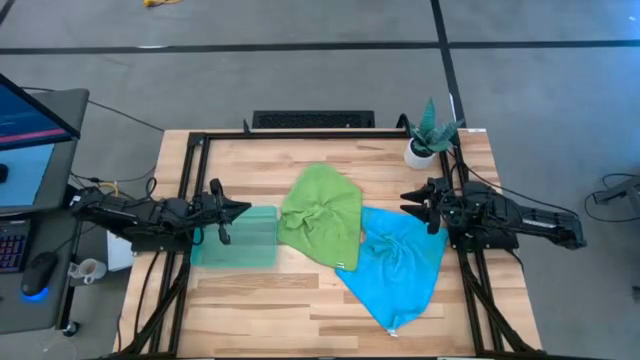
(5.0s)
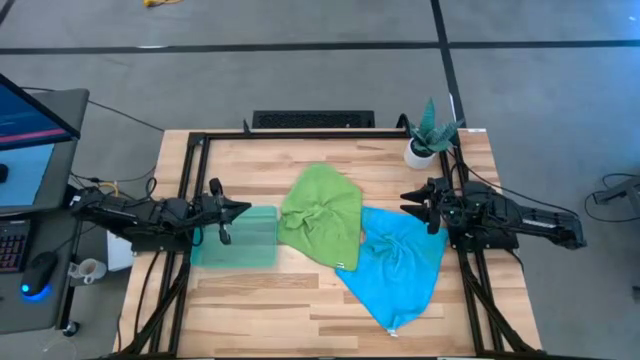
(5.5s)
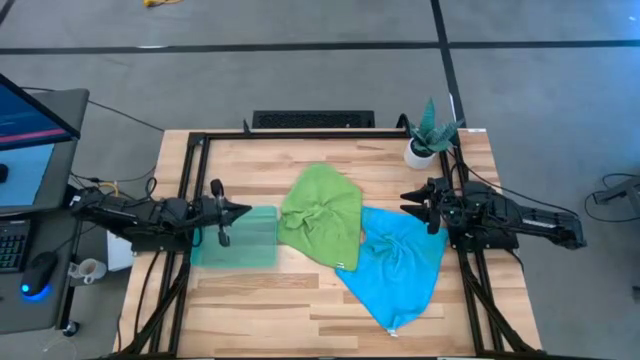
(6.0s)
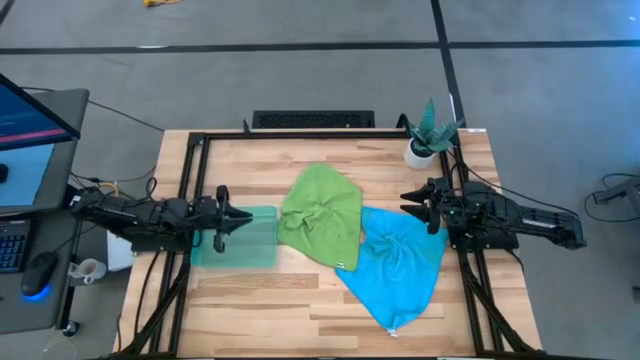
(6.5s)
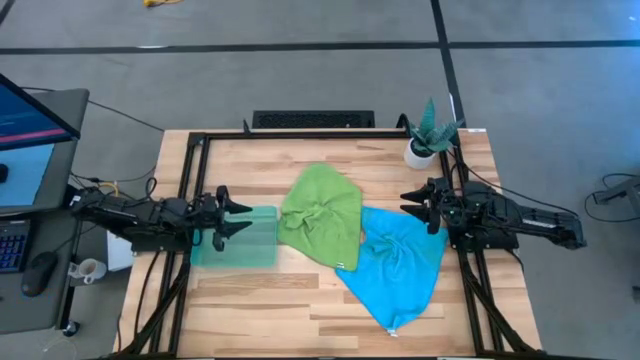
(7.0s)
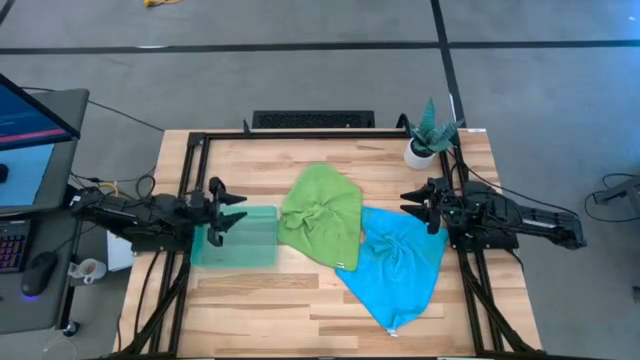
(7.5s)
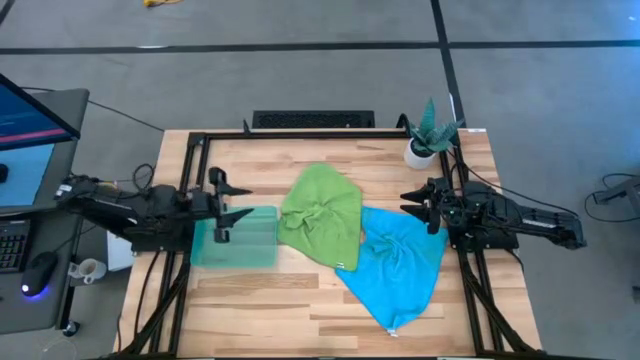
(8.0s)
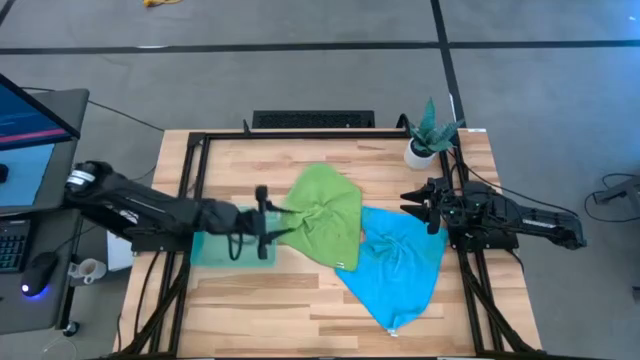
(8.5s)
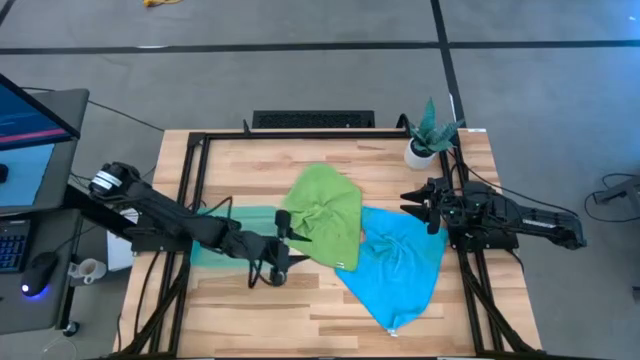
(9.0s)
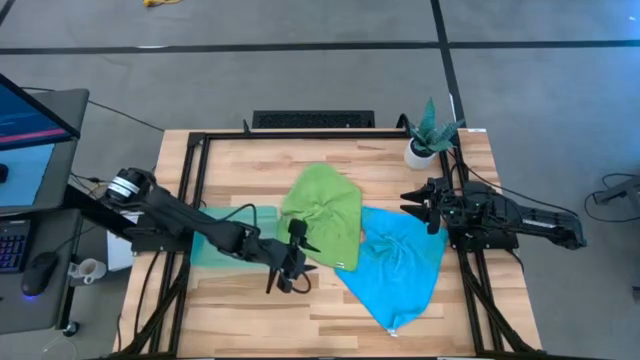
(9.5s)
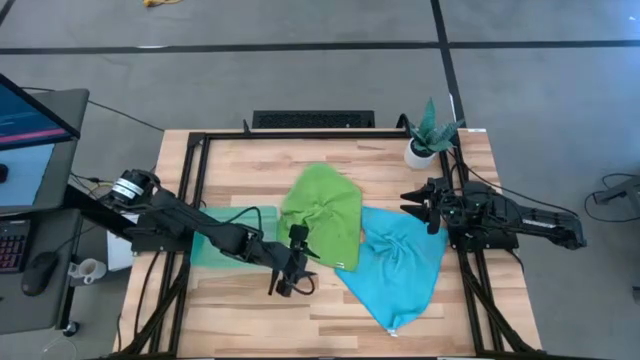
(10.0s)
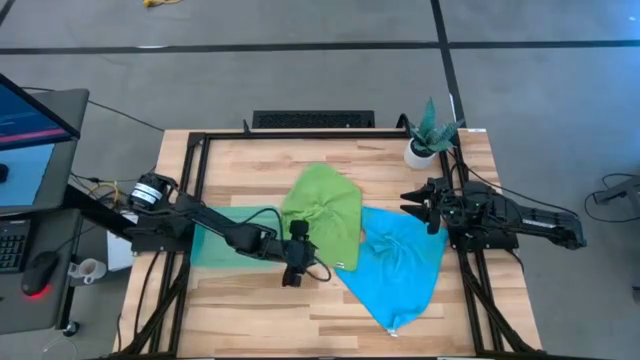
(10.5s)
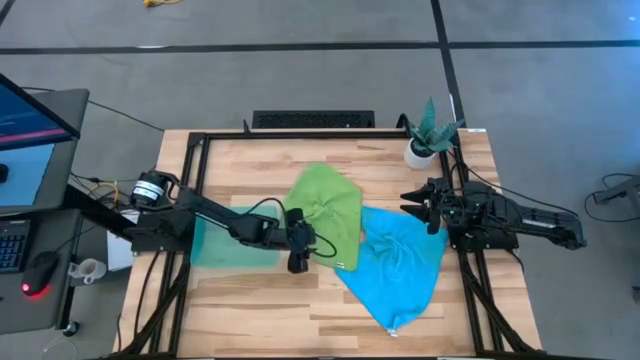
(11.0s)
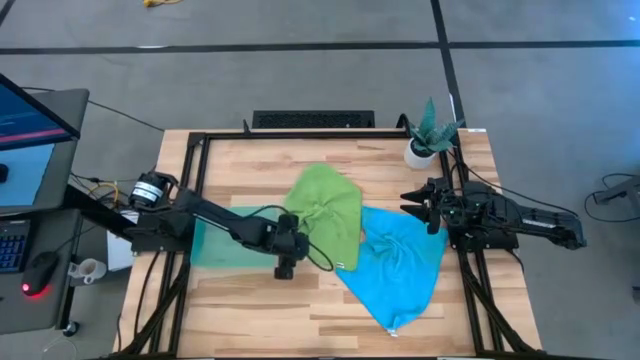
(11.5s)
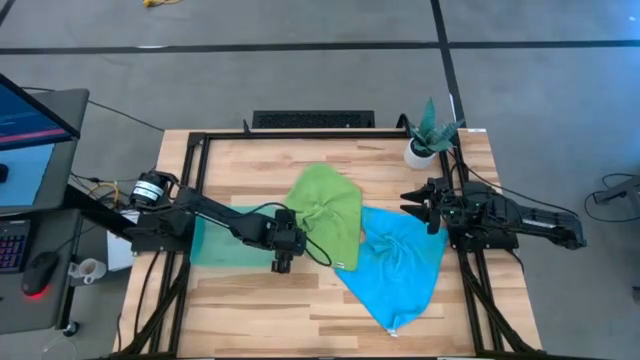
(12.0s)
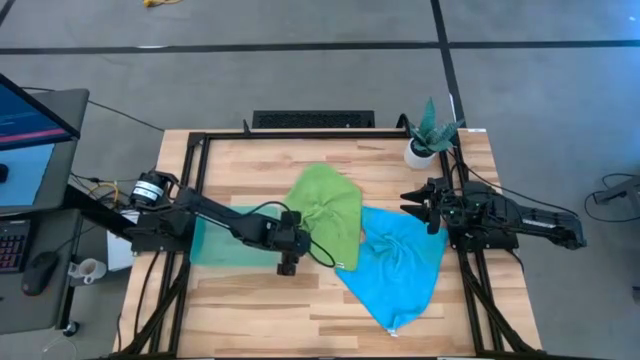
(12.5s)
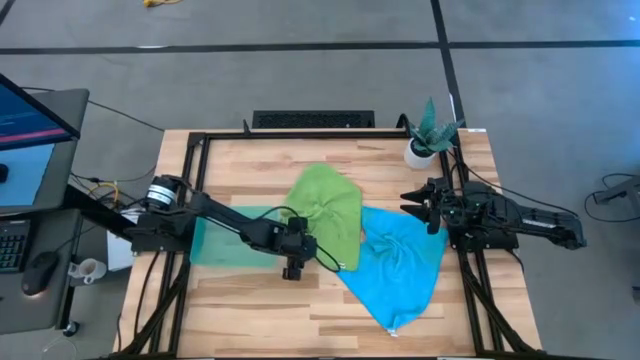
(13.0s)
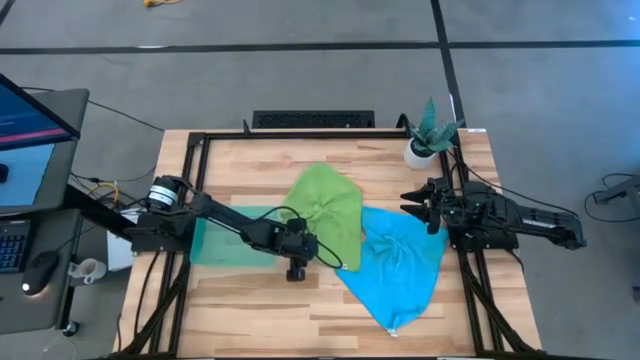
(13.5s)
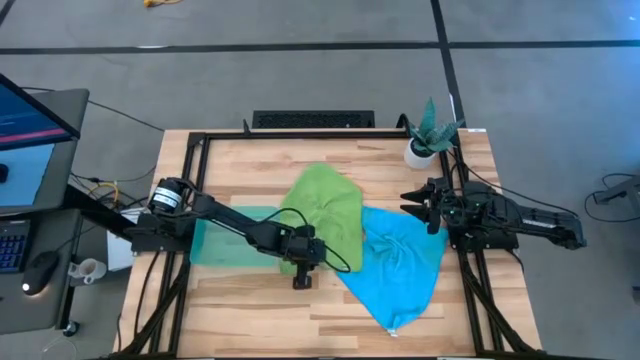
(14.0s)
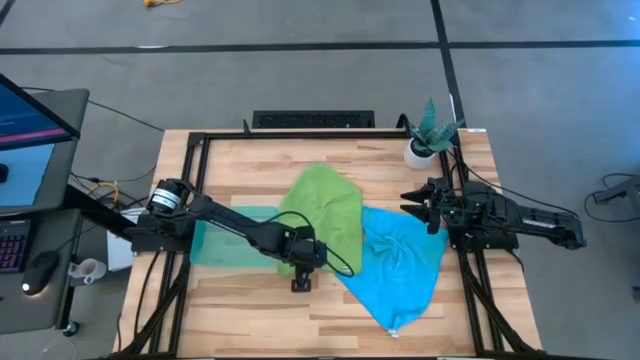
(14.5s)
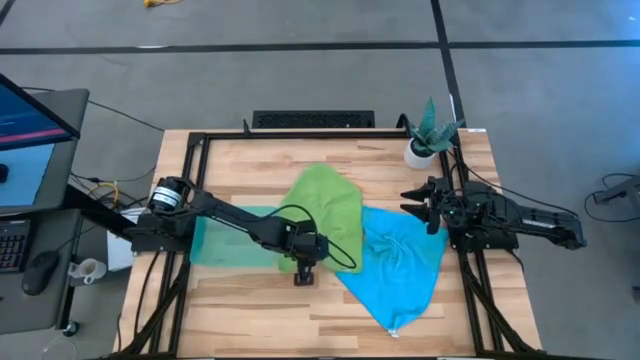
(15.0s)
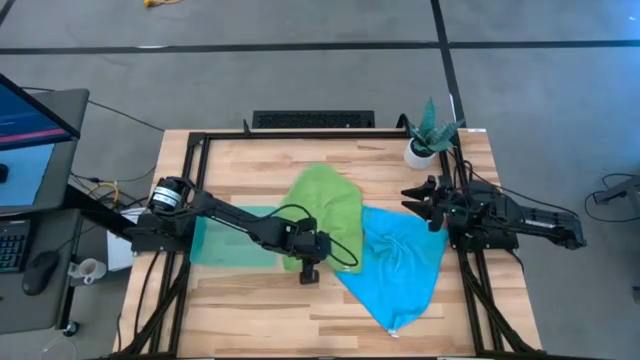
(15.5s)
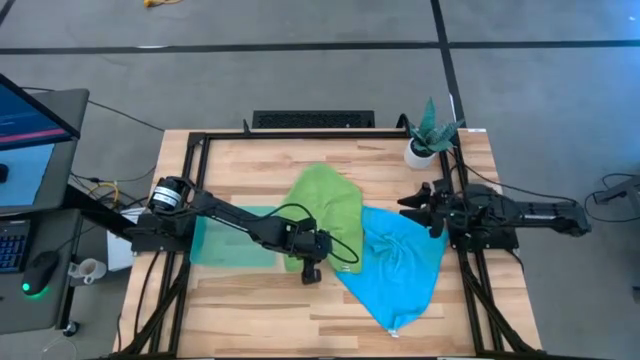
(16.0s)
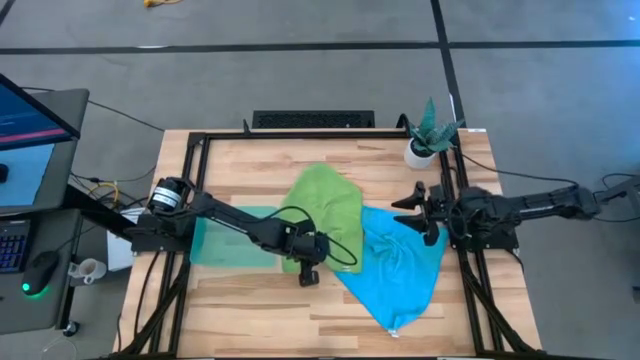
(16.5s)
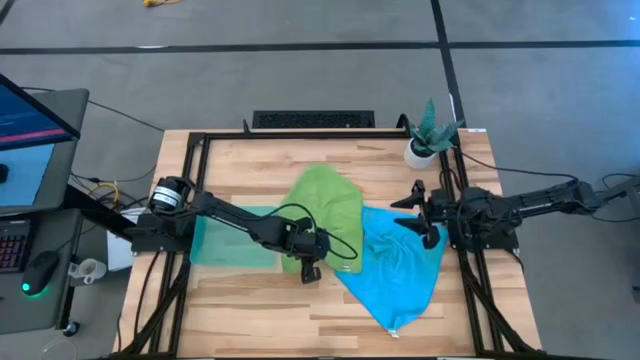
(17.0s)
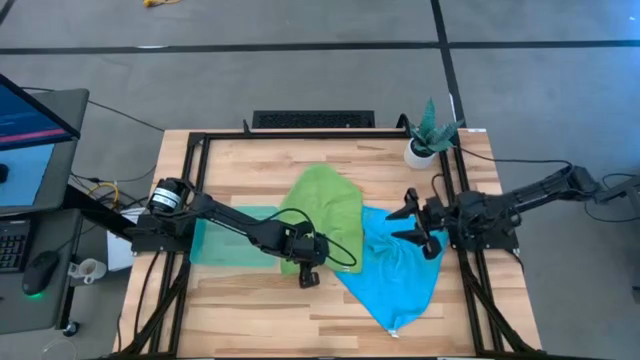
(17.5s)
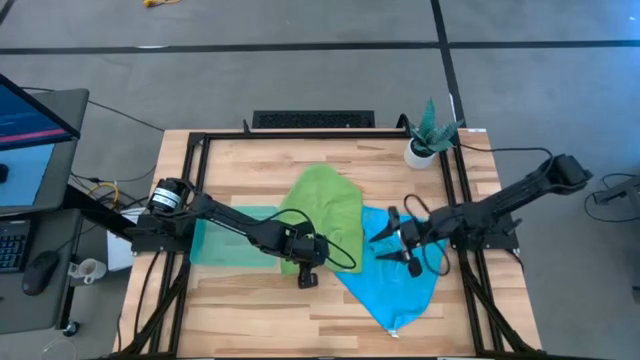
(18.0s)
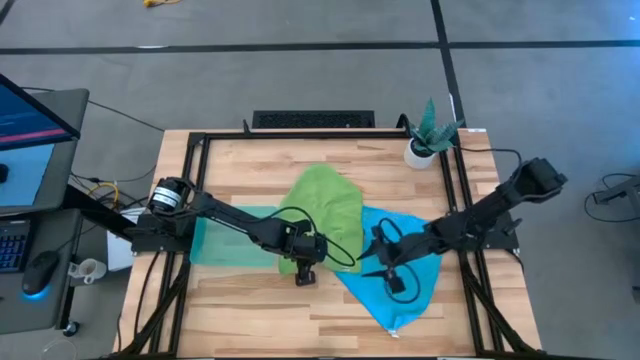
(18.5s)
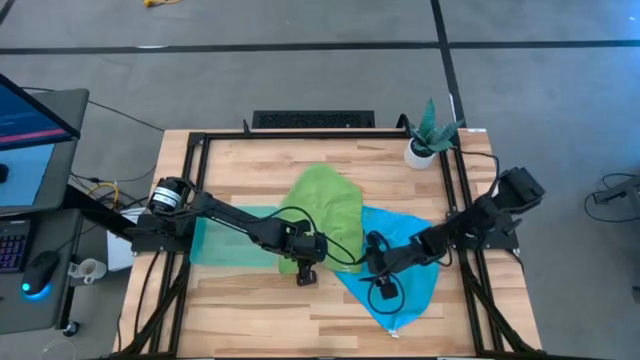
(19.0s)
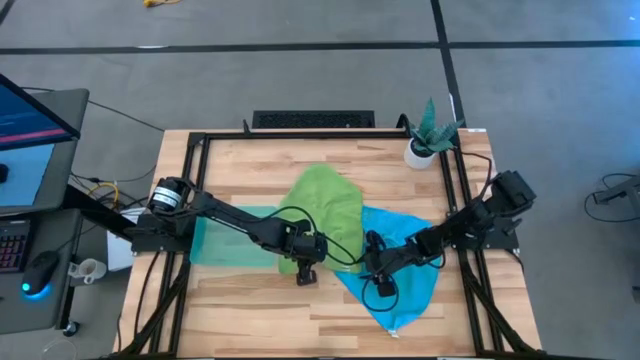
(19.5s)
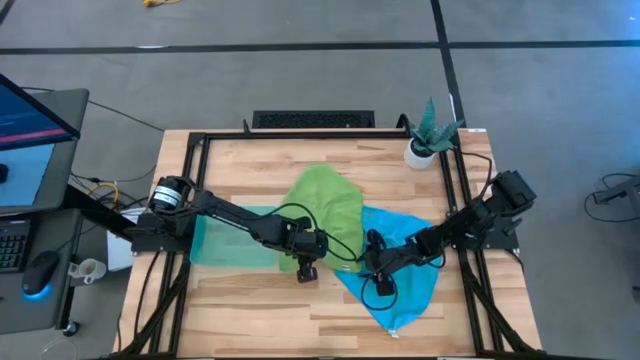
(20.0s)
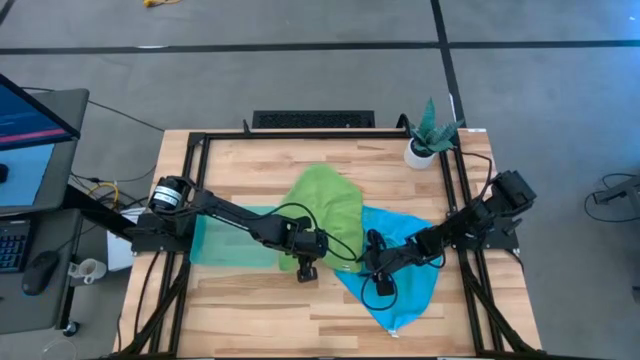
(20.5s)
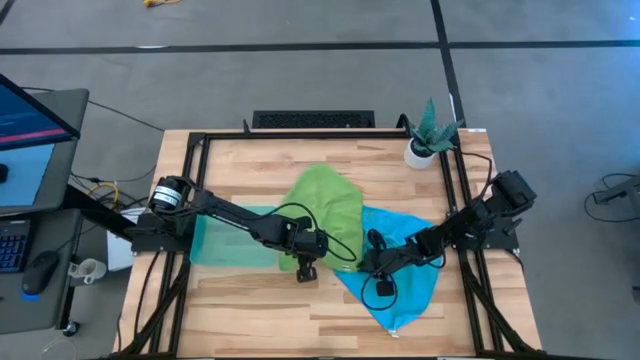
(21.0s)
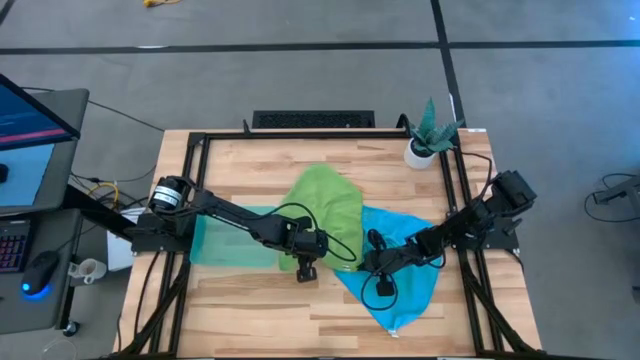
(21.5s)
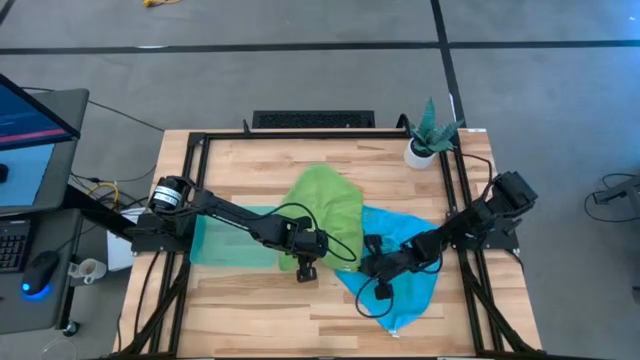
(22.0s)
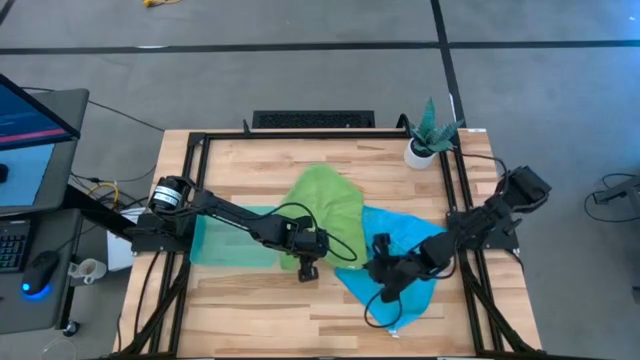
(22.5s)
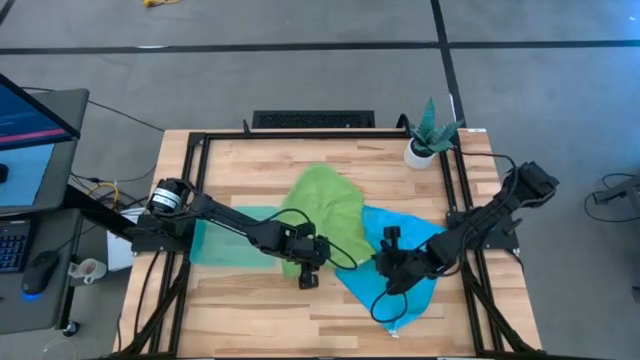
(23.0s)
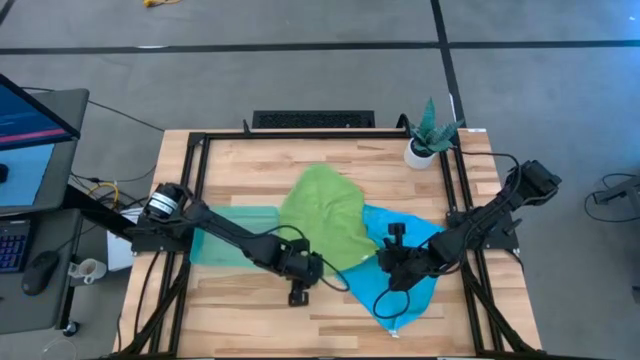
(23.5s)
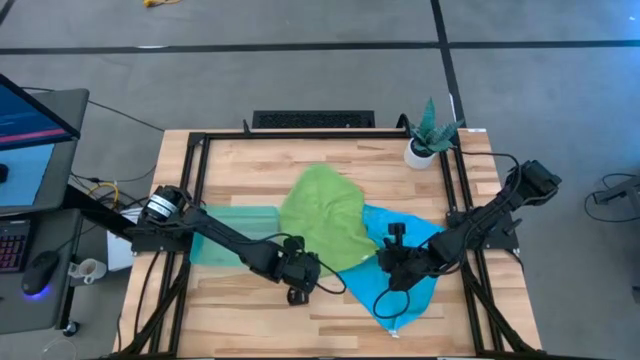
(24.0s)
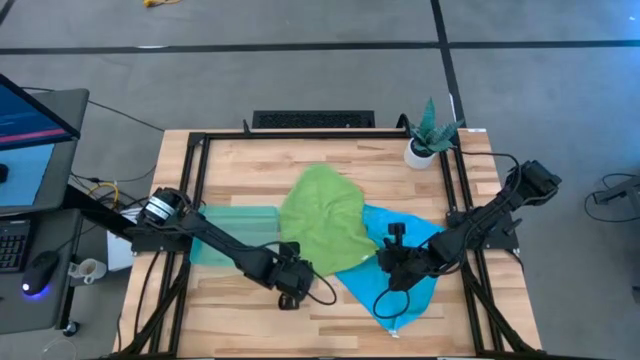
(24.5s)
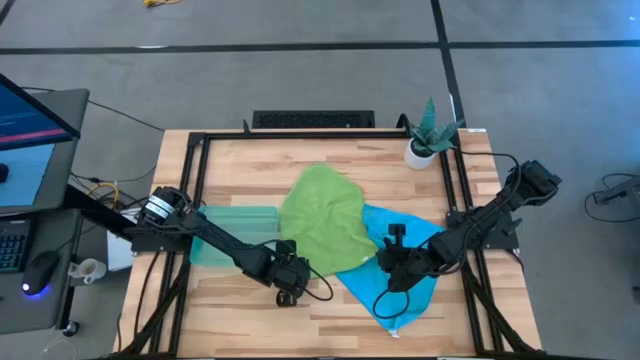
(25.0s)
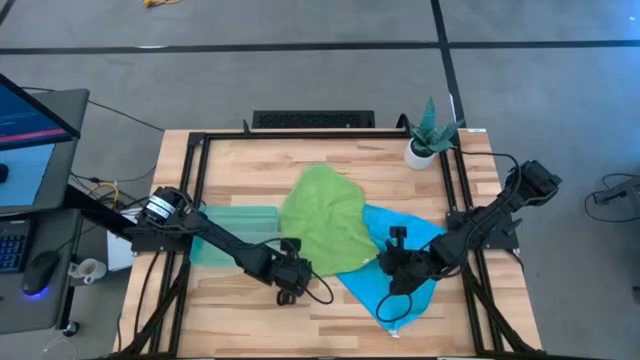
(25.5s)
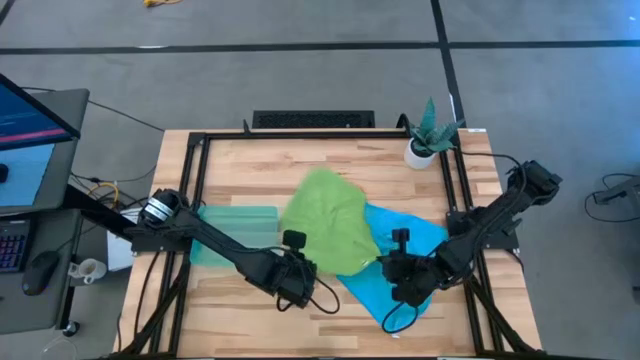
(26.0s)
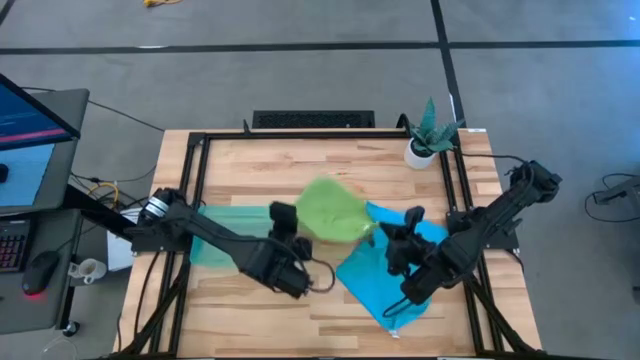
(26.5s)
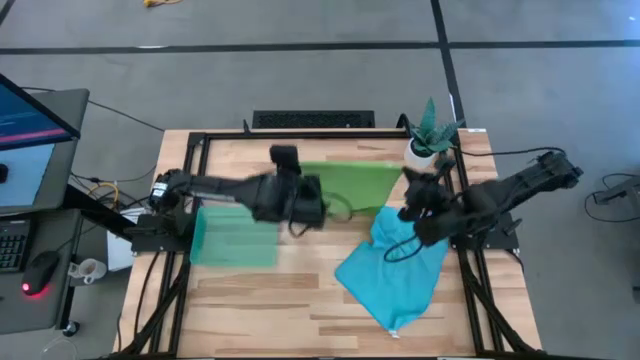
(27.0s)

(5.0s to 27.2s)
Task: Roll microfiber towels into tight, uniform cylinder then place into a basket
Fold the green towel
